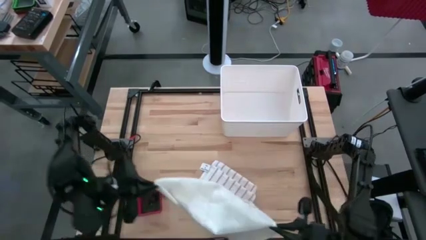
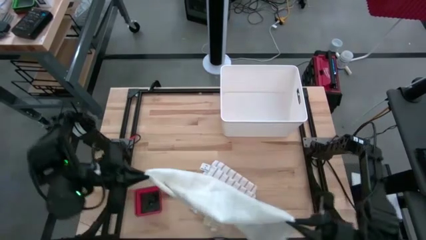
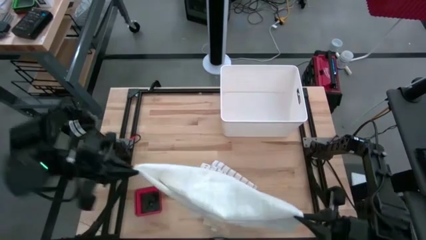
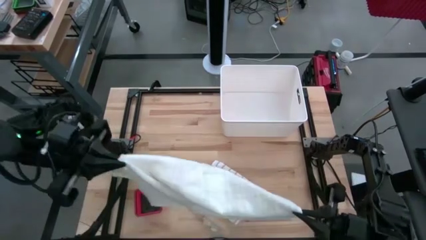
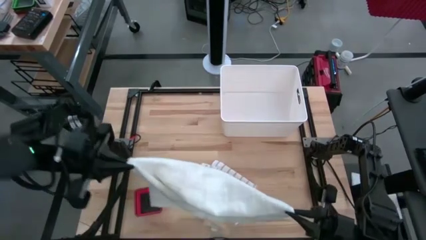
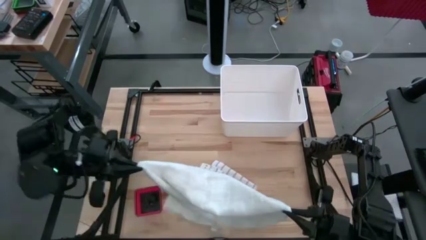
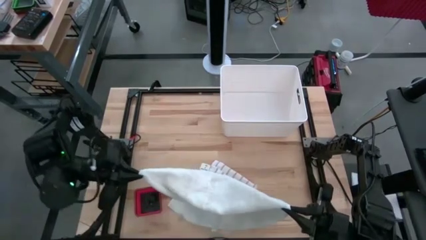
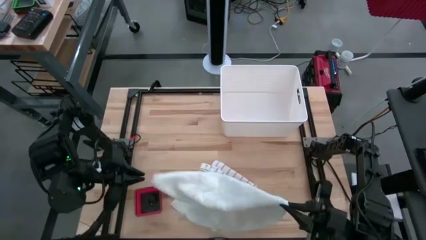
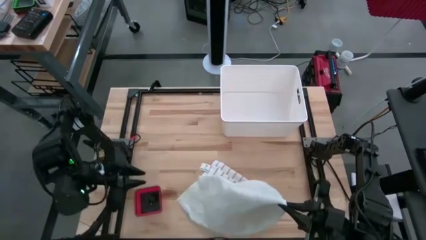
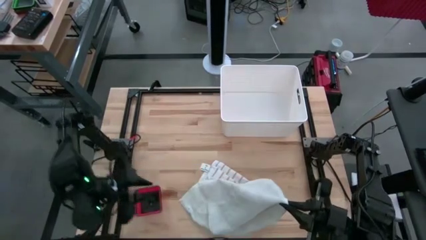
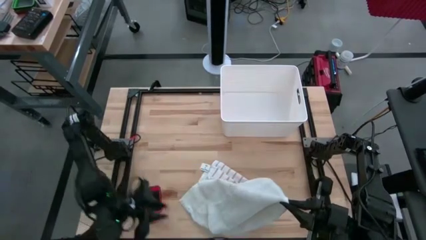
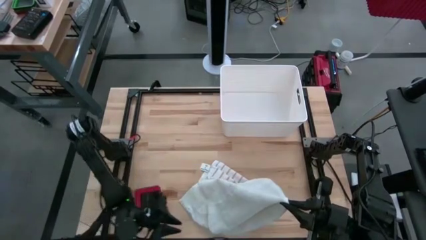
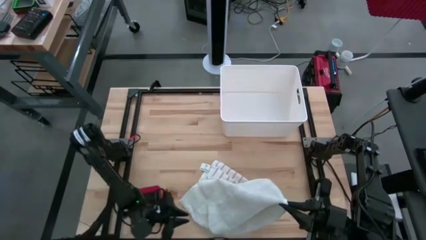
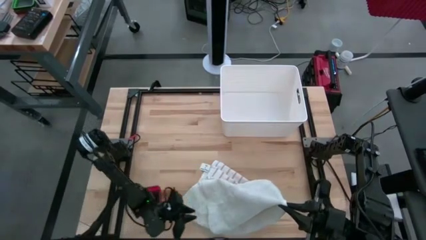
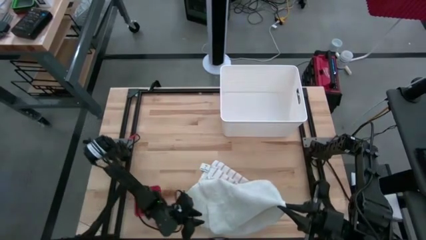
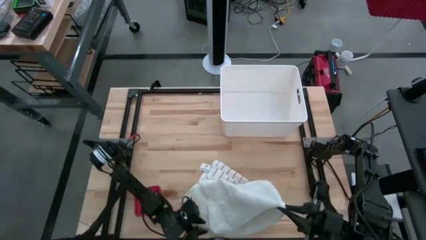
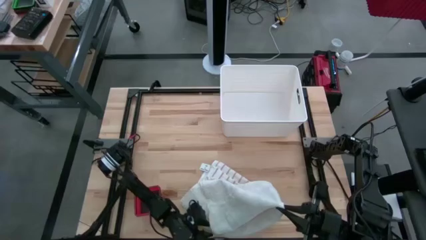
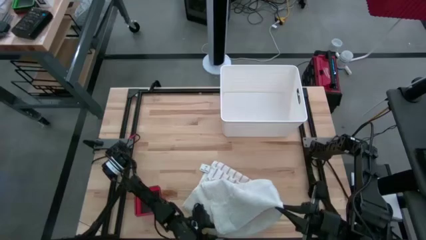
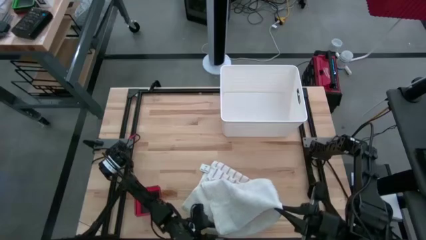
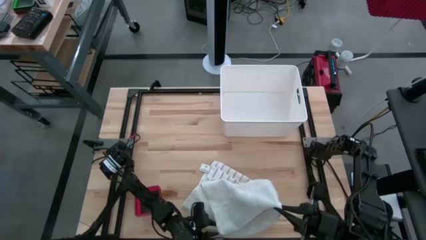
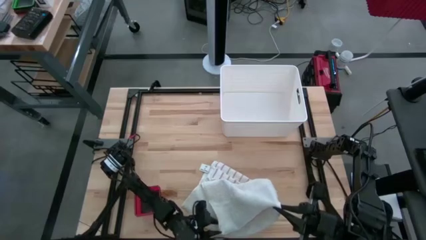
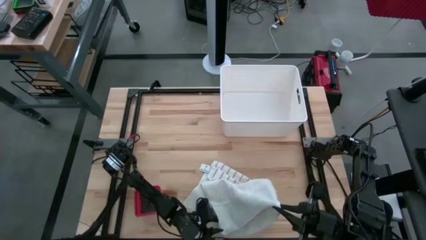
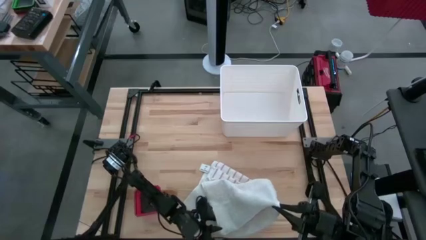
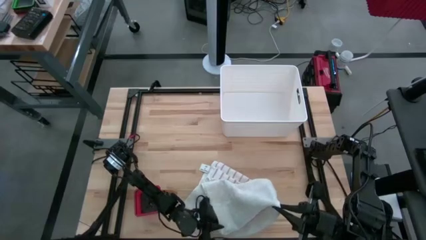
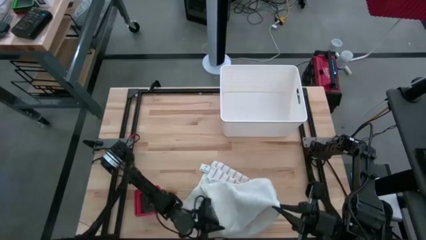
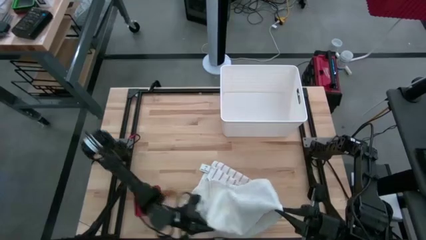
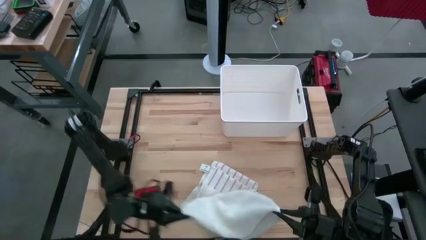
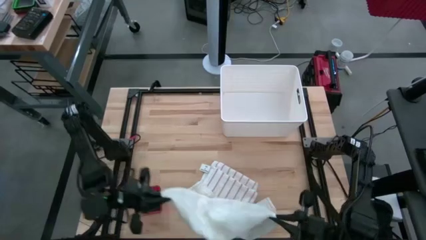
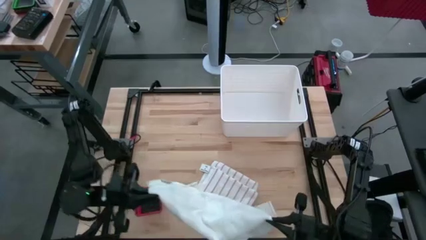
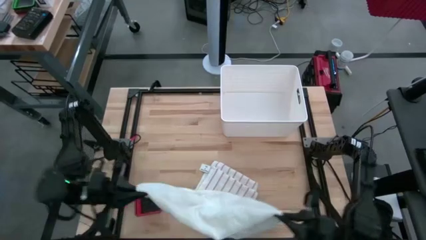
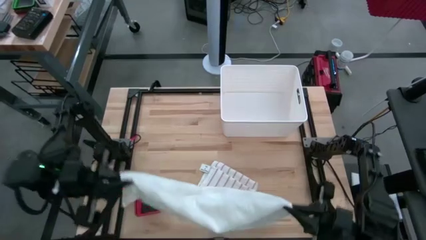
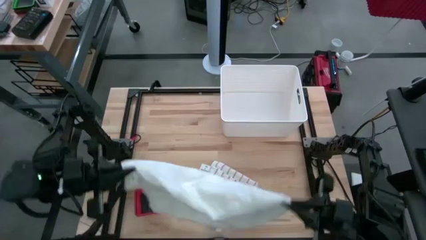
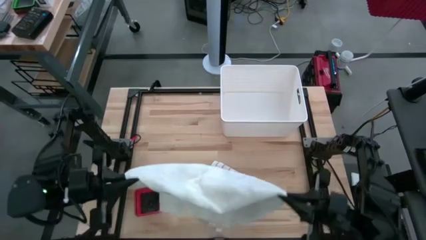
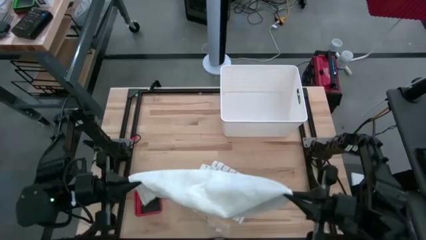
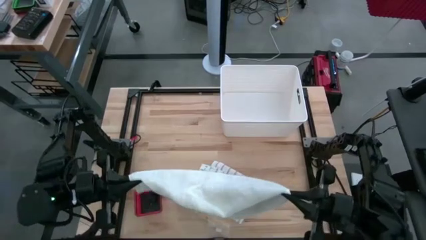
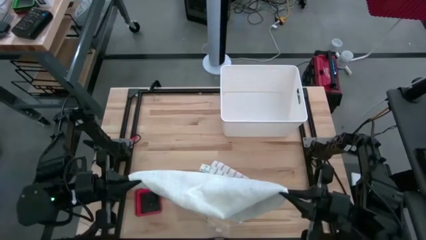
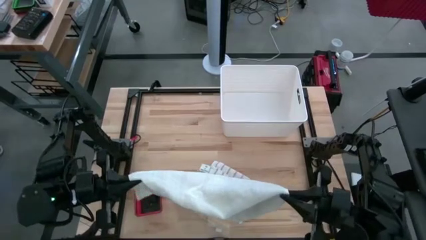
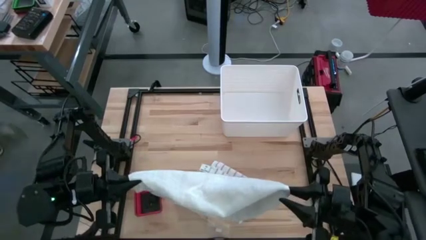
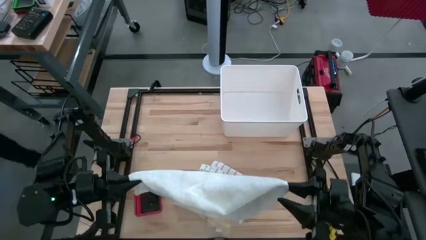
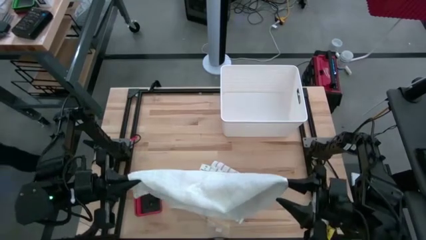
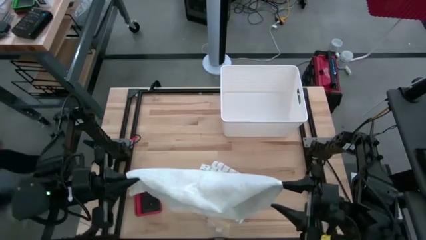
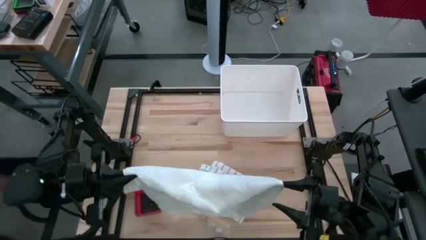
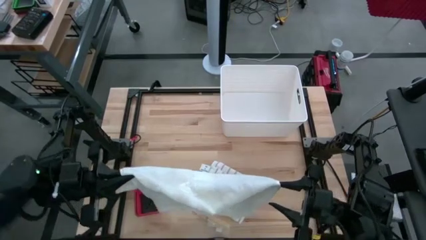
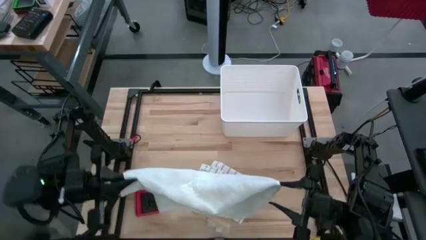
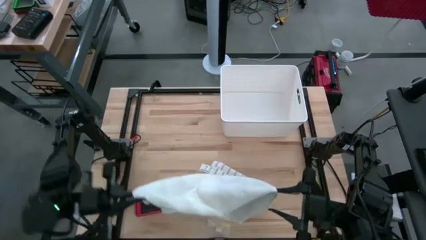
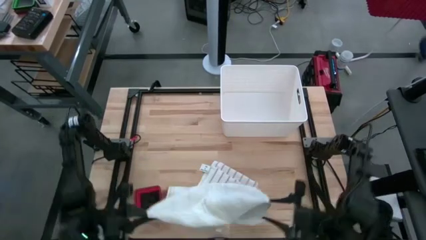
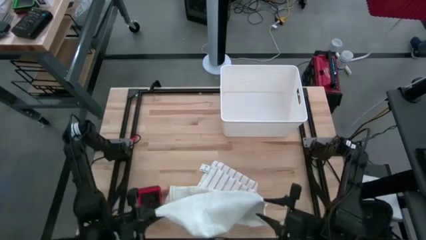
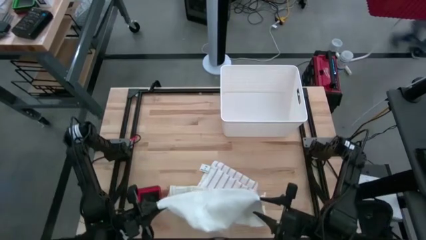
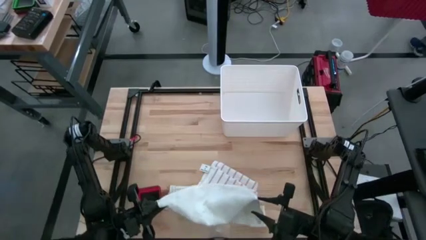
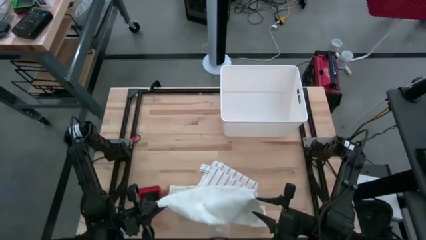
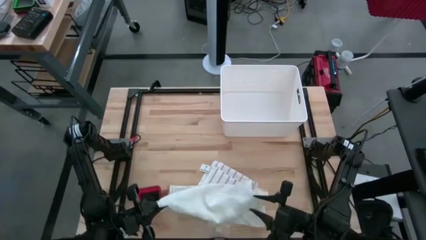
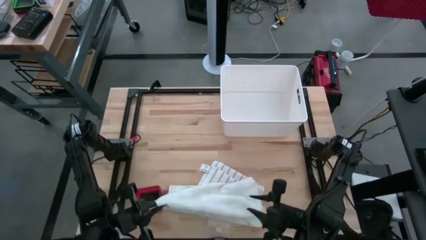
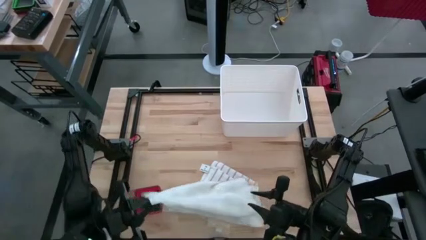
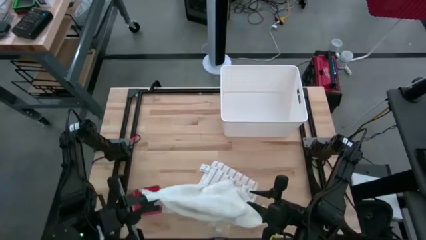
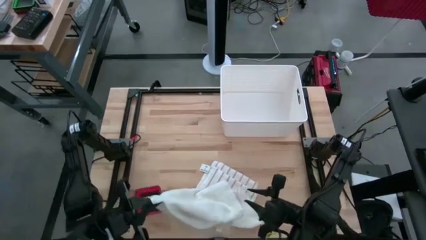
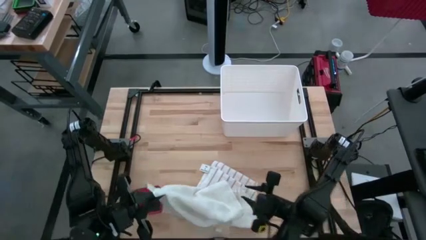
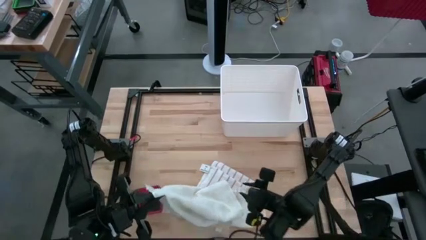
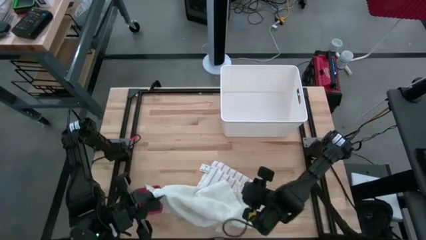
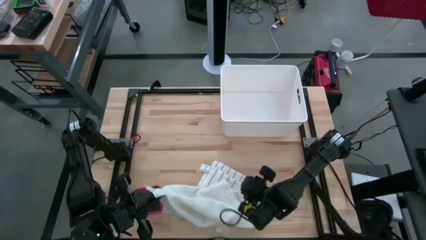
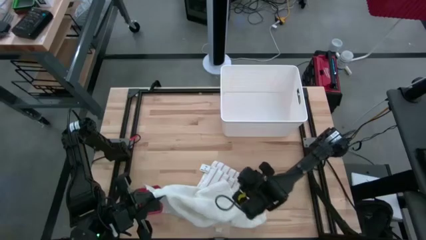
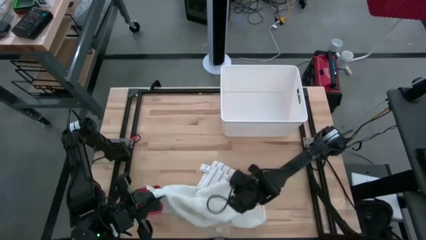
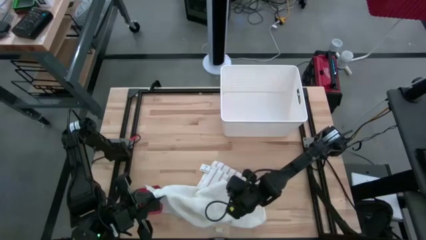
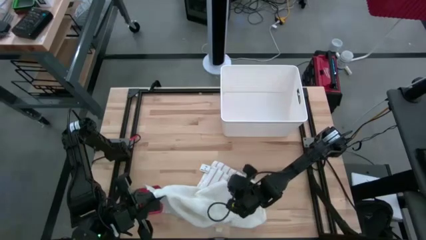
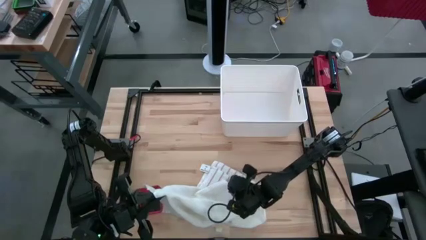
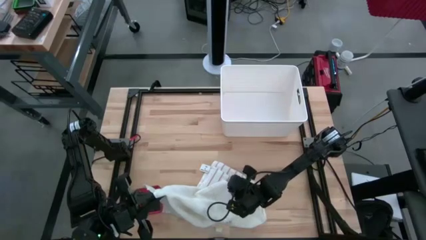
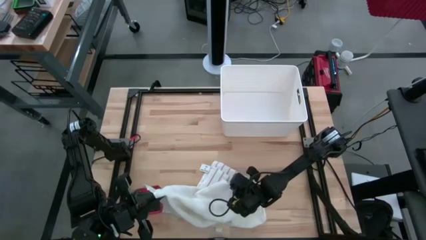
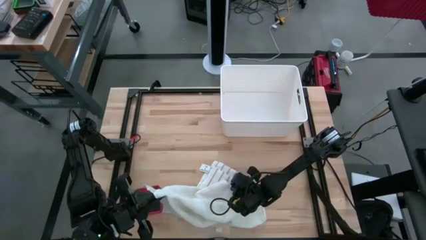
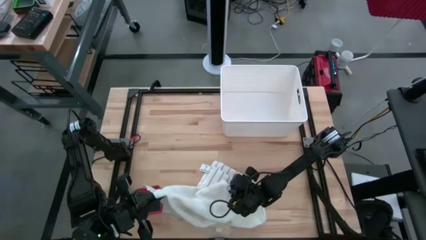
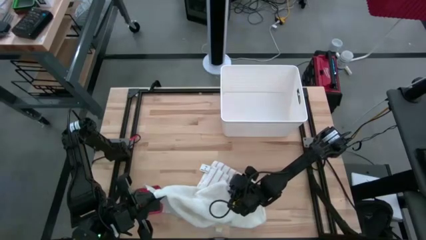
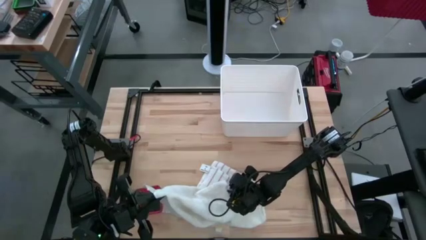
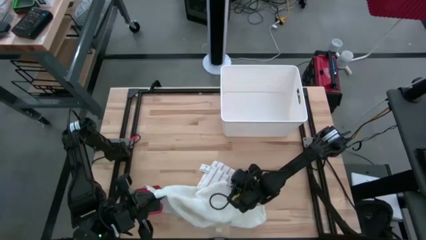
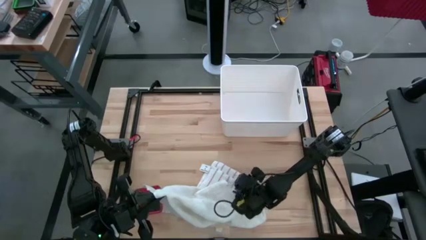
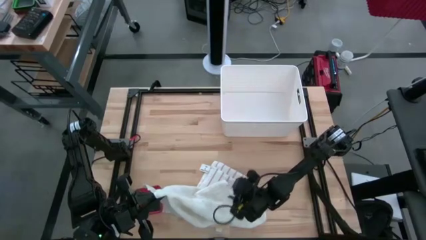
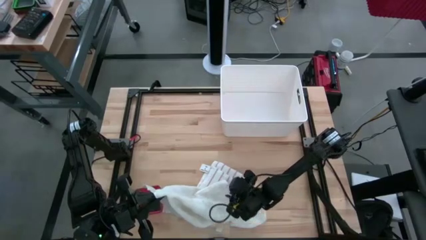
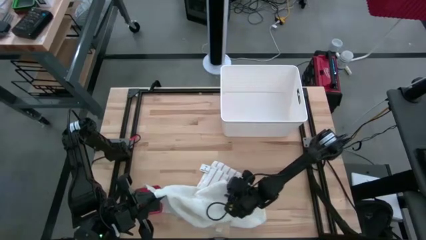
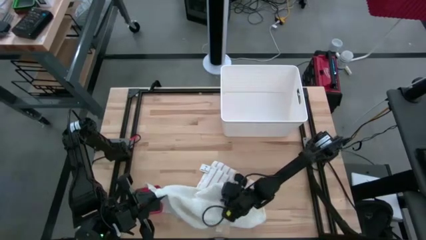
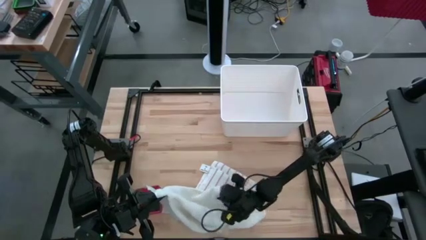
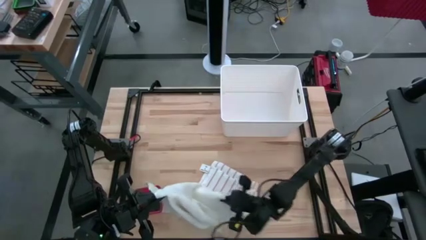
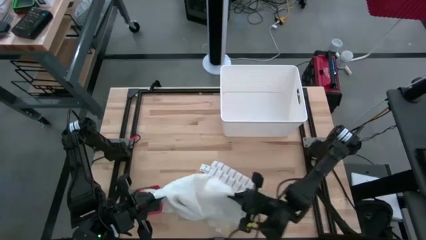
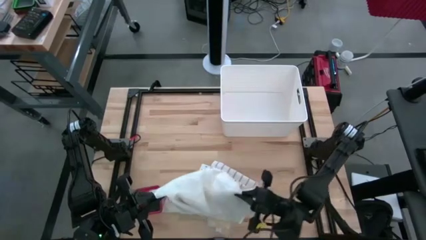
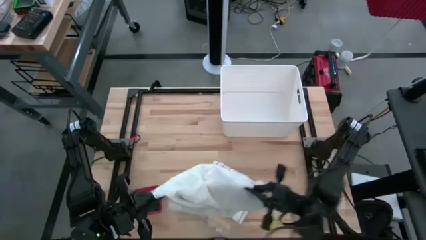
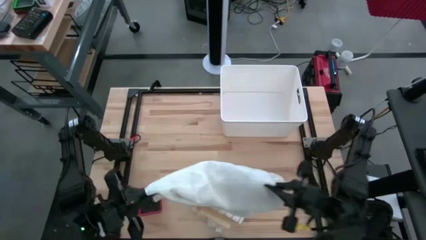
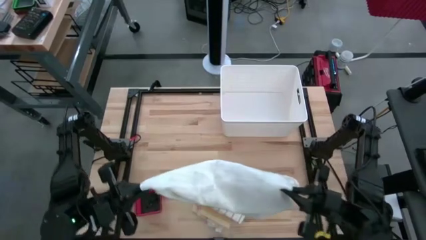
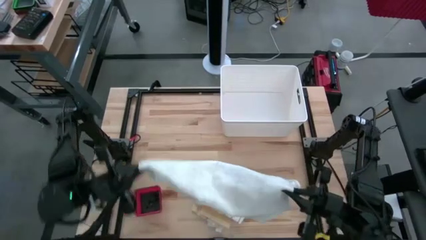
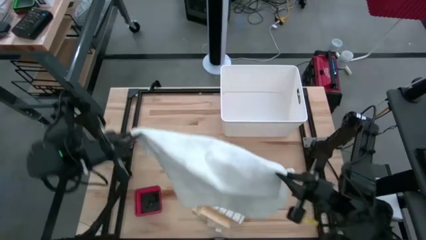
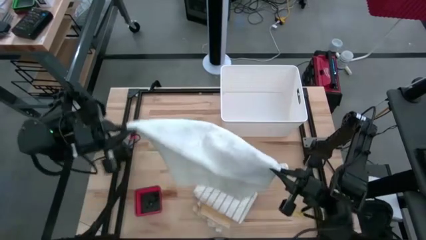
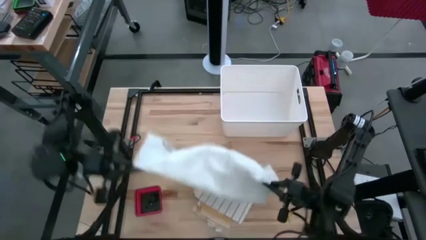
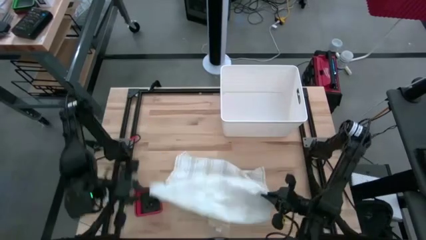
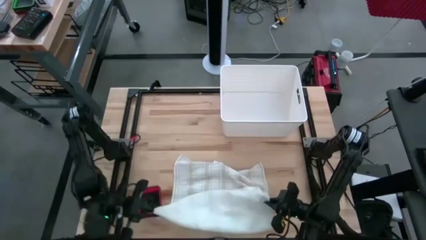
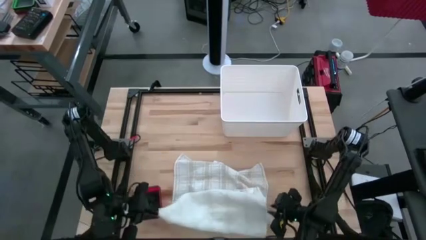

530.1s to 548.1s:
Task: Fold towel
Fold the light brown kitchen towel
